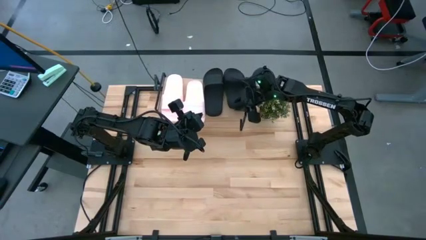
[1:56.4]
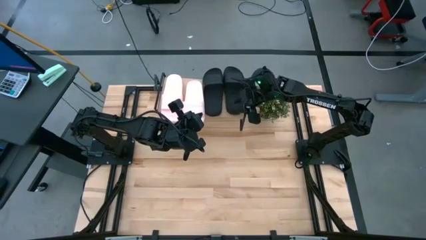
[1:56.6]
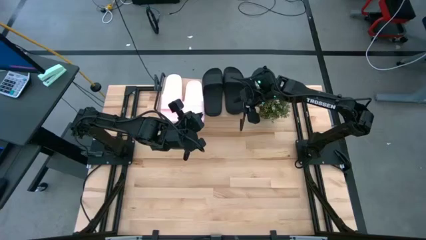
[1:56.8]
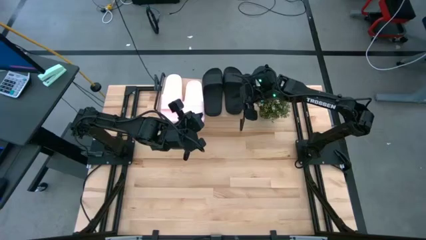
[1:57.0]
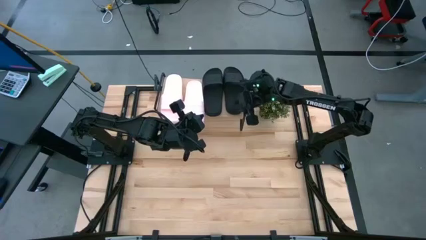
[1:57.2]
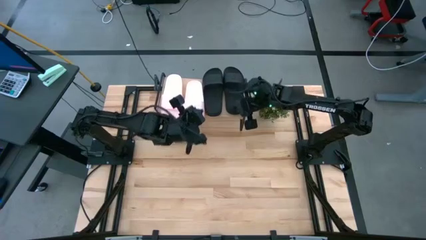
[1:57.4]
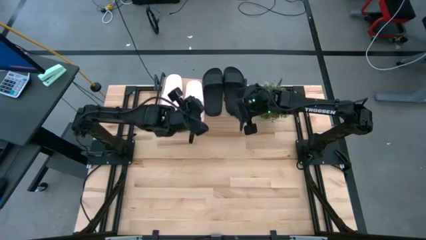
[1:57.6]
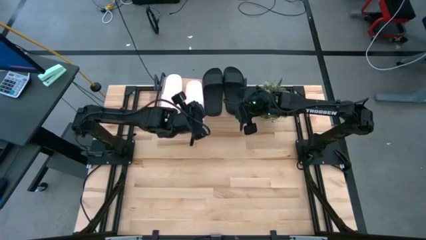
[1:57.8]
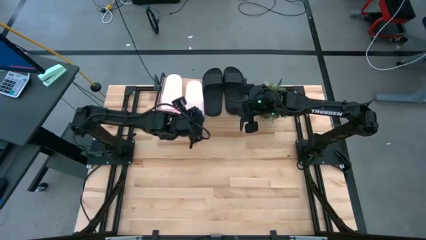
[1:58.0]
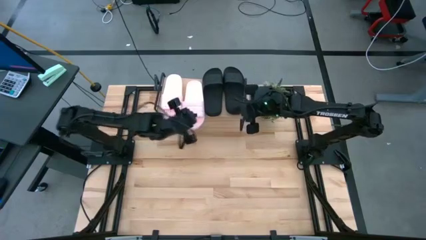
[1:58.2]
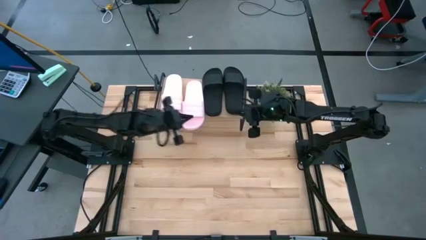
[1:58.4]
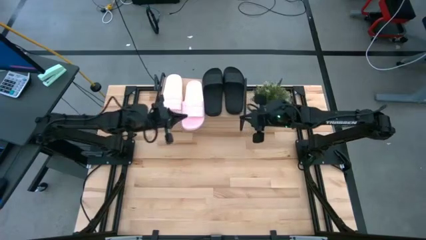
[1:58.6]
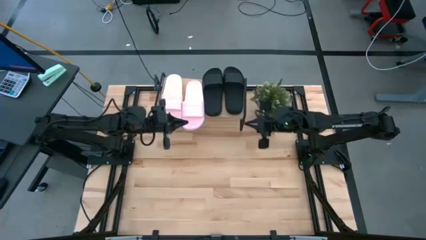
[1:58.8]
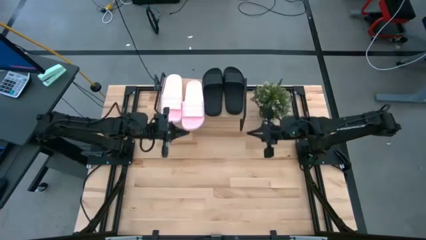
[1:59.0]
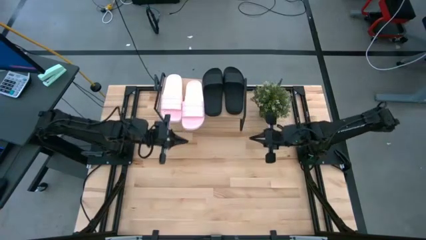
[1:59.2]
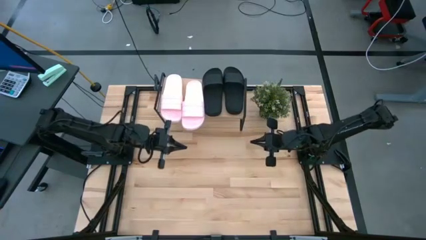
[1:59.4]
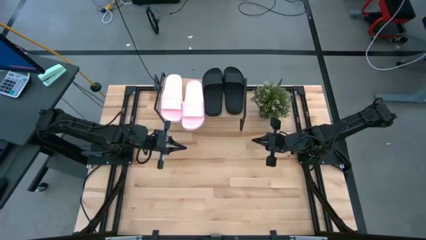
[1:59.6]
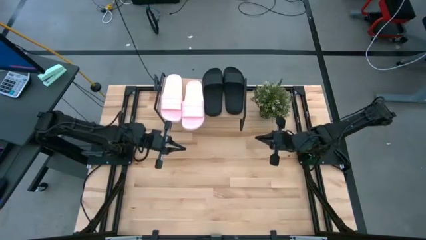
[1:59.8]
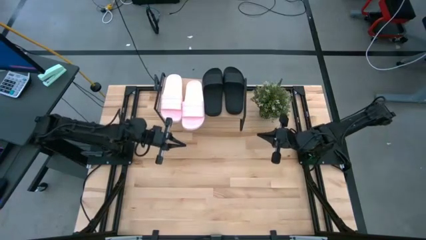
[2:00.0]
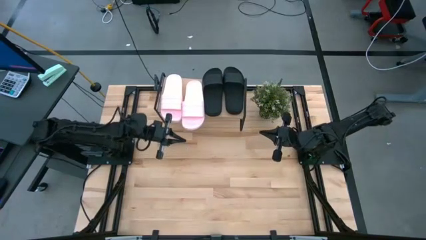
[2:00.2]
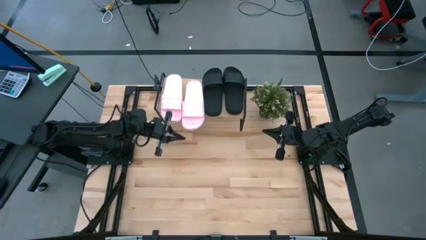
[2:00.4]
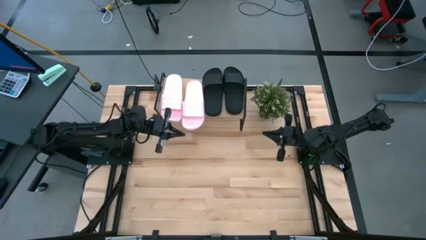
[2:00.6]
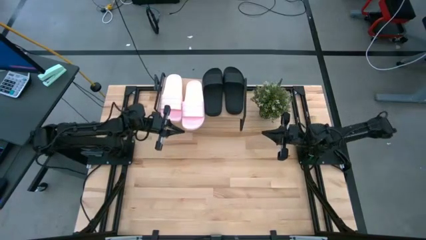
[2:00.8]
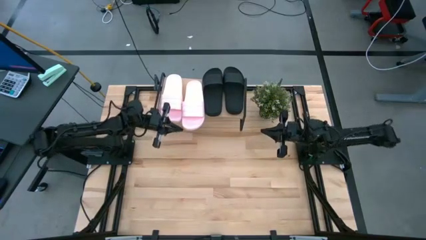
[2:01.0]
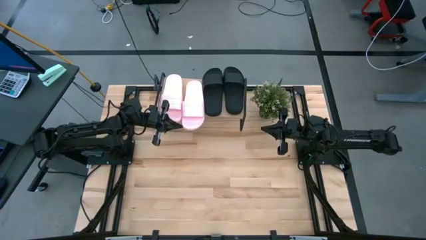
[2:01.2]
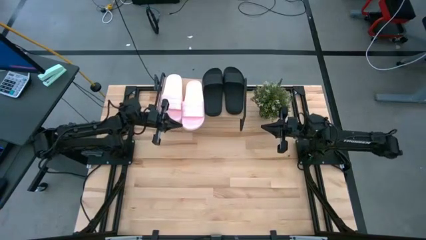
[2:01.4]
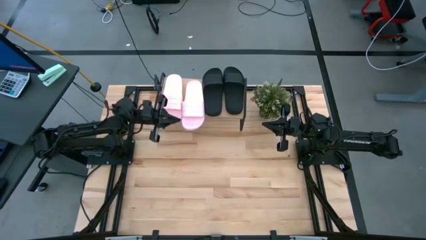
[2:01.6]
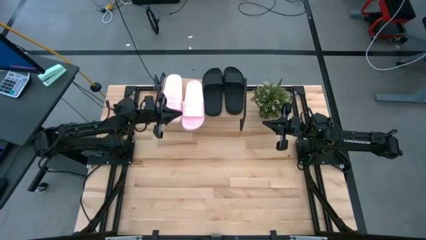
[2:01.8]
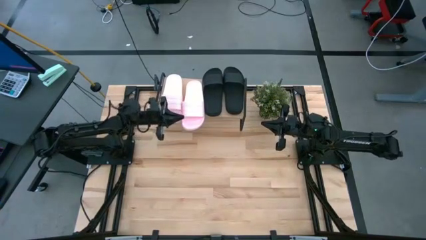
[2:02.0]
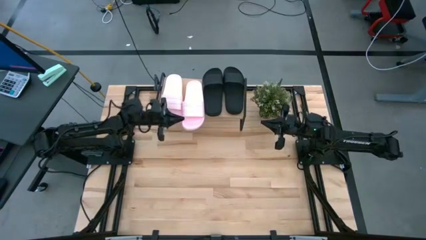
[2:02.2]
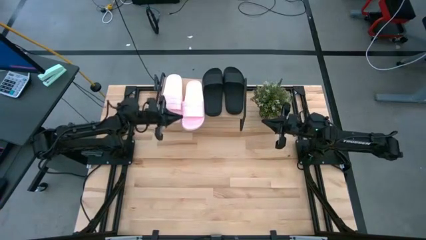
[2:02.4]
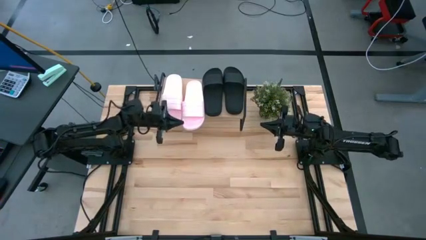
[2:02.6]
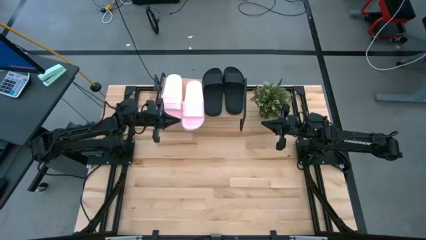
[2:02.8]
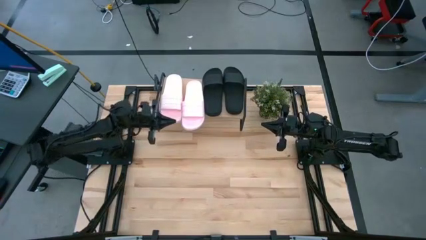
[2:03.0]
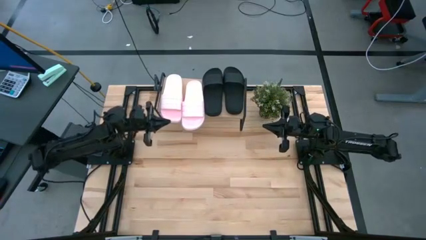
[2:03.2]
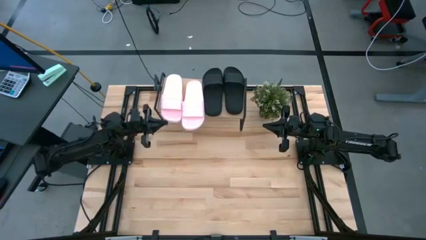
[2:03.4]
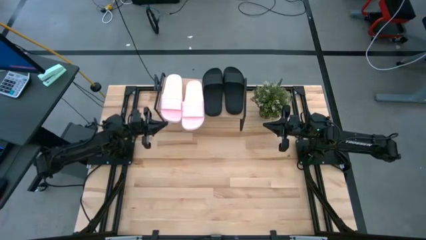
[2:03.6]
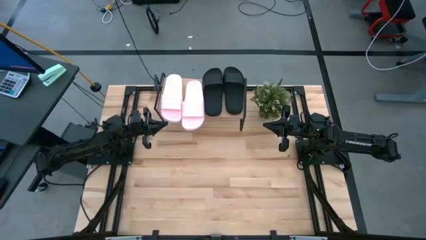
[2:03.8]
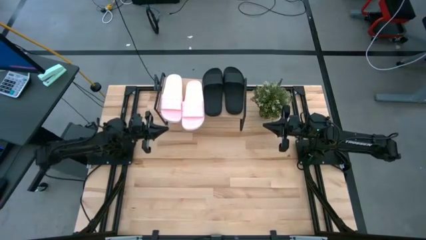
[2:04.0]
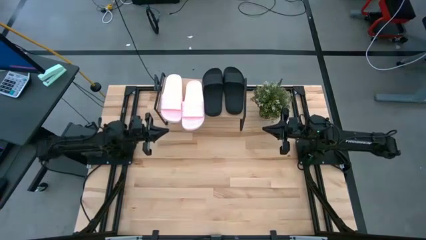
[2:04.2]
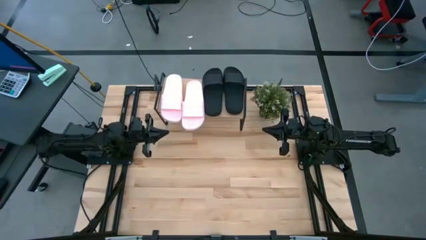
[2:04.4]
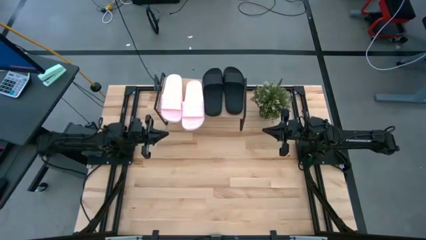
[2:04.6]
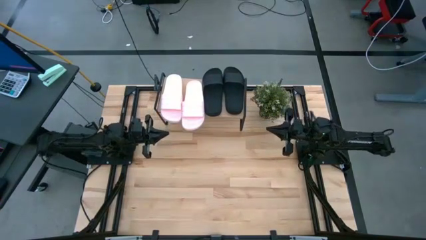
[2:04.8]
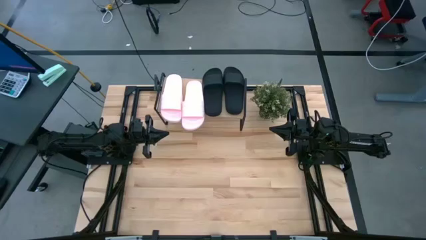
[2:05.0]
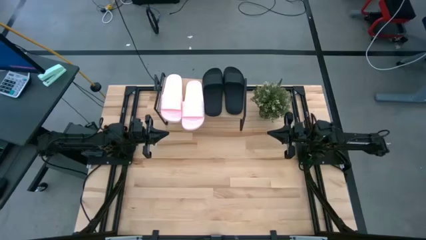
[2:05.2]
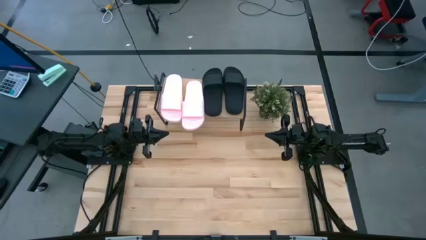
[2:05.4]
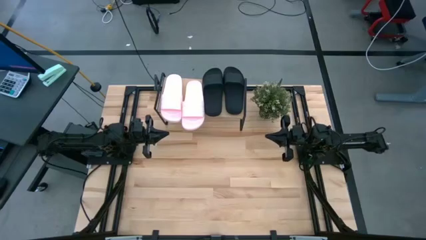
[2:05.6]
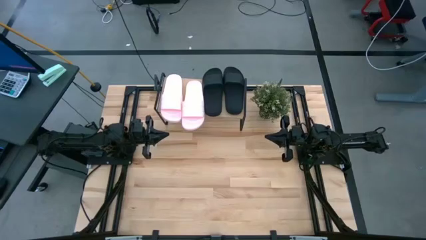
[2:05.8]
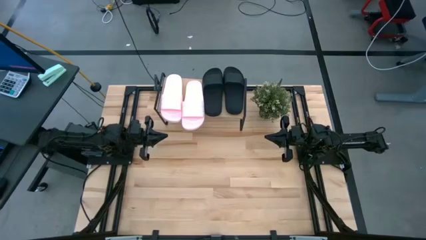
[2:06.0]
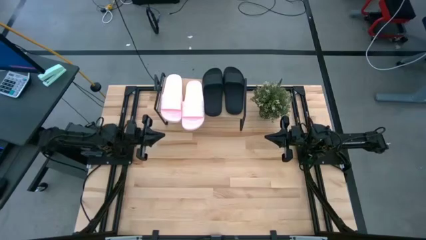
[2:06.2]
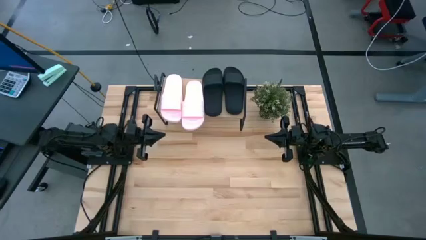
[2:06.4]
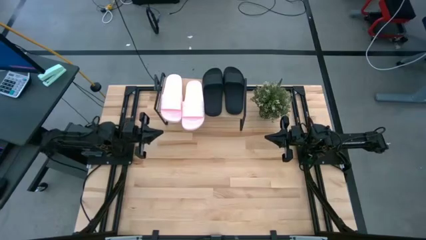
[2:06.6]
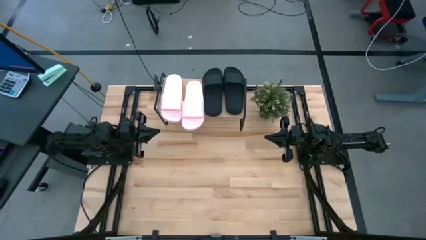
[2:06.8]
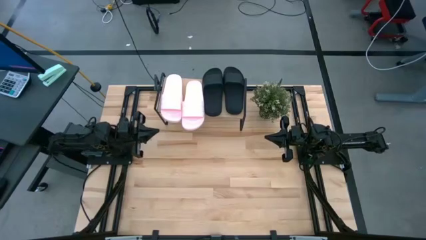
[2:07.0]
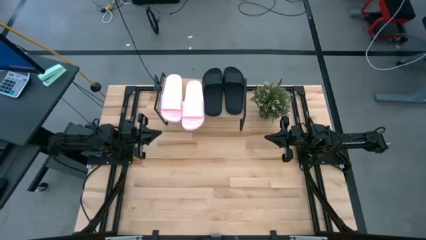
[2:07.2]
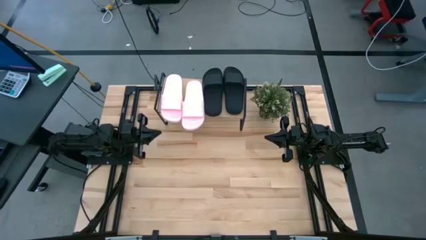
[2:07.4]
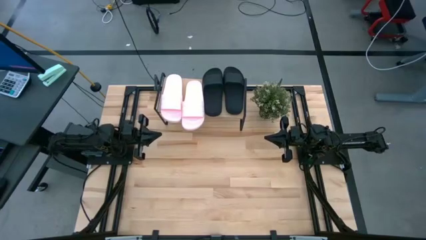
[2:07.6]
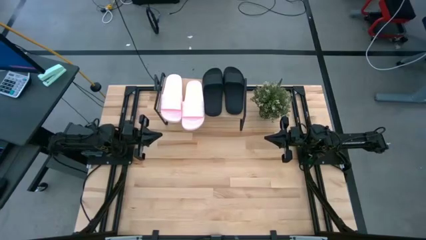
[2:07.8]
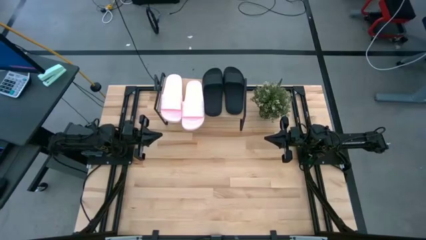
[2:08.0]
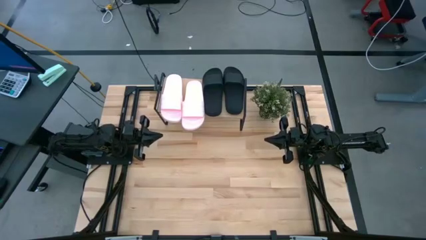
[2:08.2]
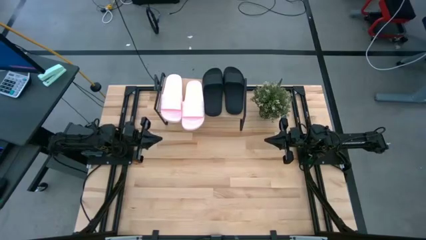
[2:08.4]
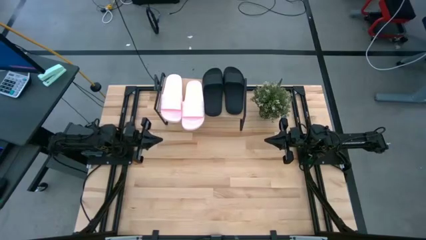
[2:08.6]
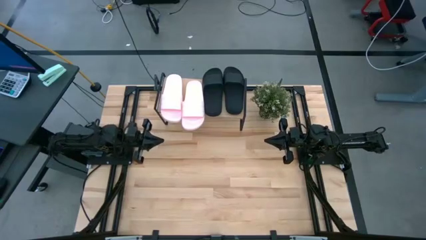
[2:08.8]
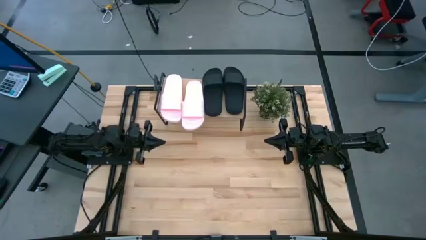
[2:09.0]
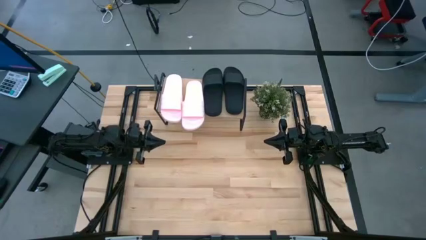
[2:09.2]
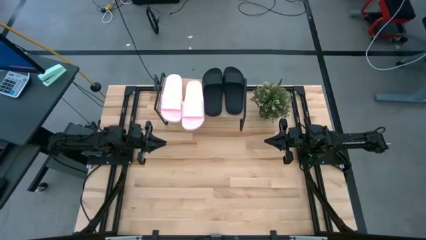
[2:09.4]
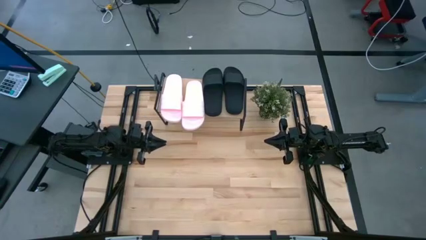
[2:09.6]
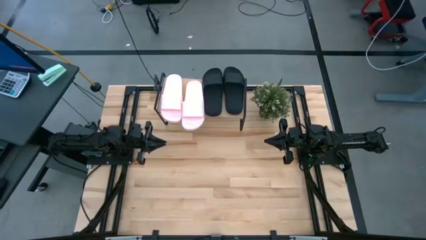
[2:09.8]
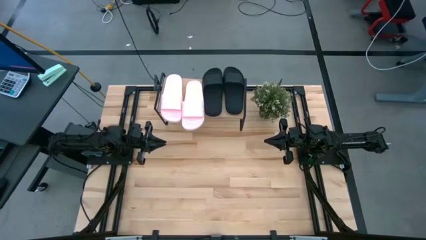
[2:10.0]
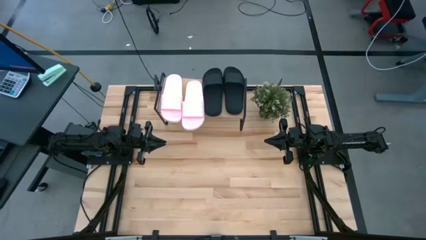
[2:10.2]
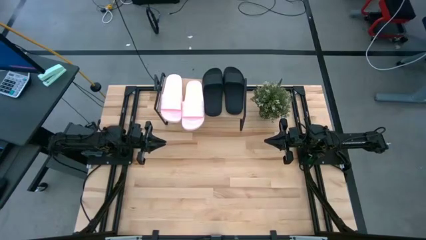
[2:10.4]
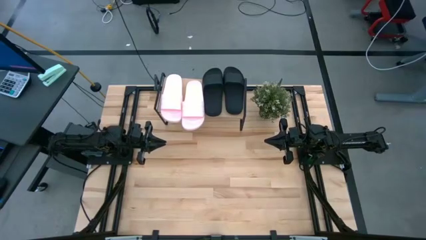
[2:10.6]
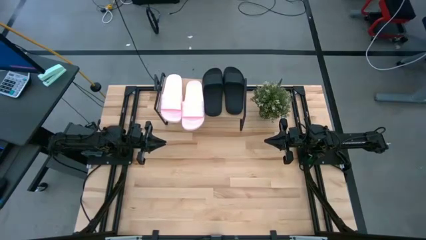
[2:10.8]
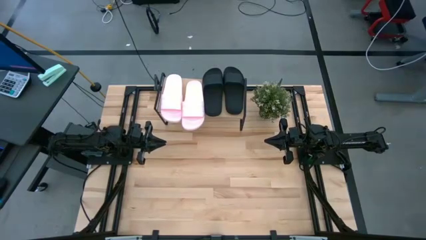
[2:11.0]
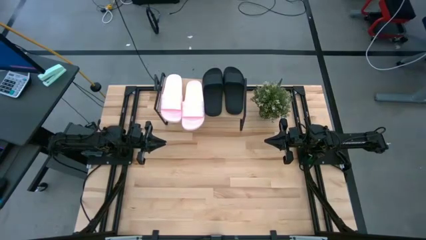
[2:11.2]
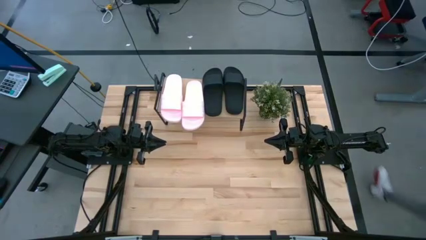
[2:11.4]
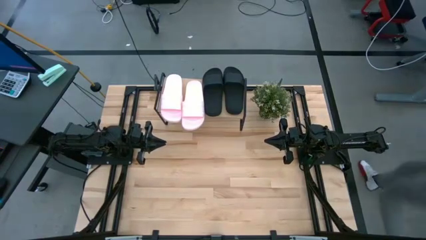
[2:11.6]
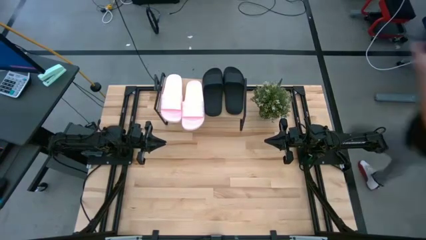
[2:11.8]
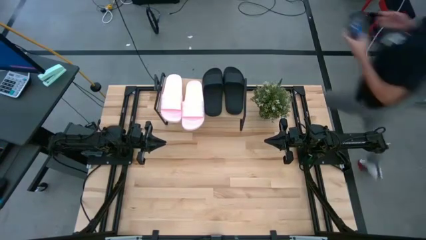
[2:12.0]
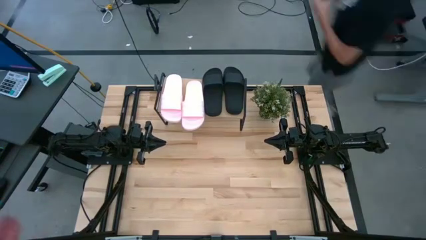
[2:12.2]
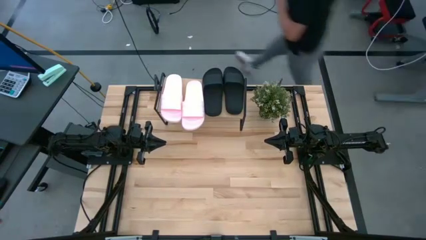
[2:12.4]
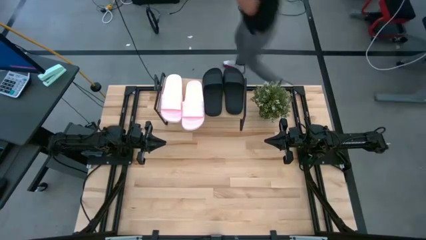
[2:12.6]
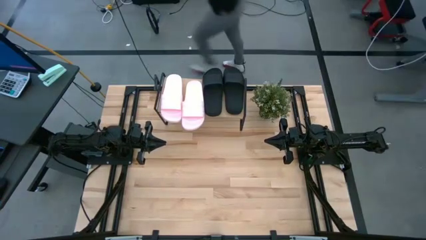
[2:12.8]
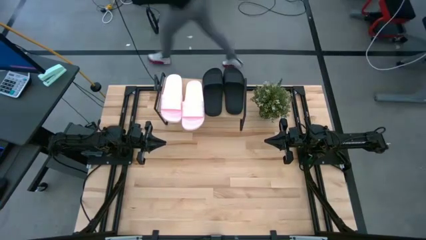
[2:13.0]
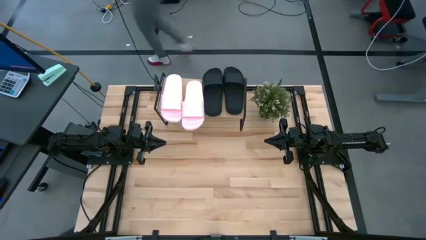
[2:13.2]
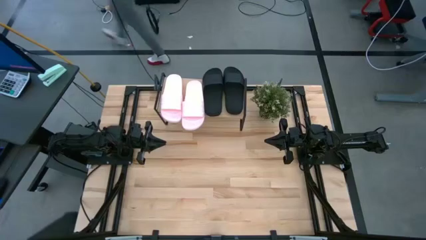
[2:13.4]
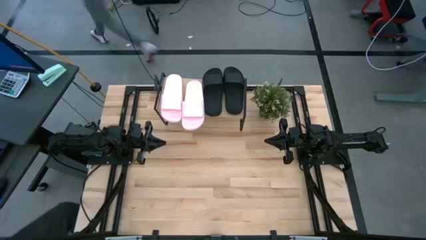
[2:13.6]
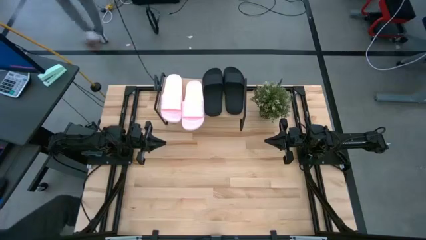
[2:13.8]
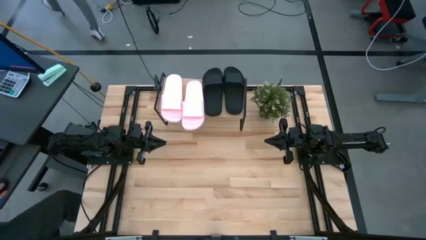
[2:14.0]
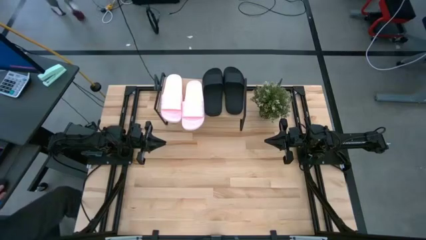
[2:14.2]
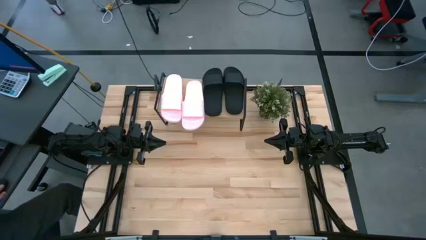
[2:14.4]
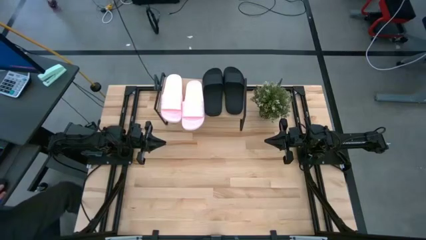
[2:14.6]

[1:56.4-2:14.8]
Task: Pick and place slides into the shelf
Return to Home Position
